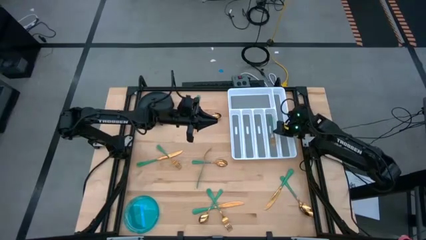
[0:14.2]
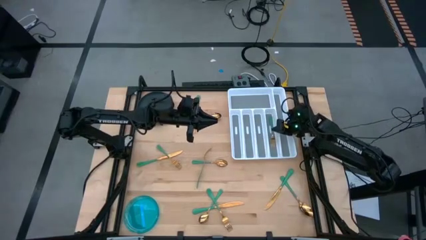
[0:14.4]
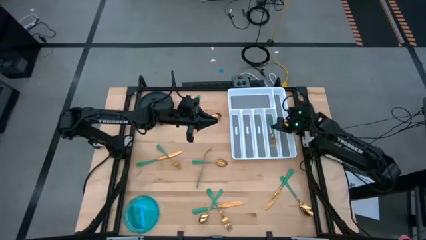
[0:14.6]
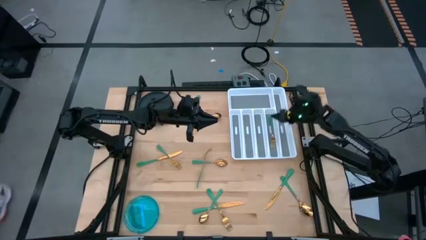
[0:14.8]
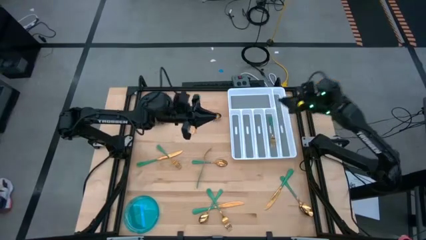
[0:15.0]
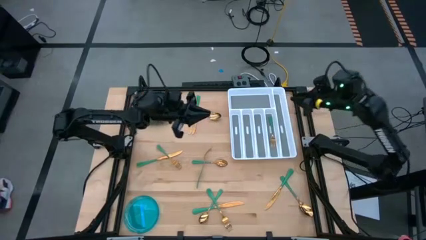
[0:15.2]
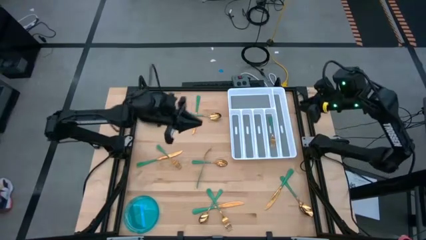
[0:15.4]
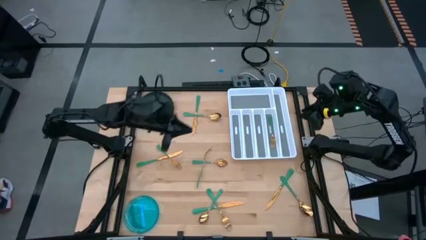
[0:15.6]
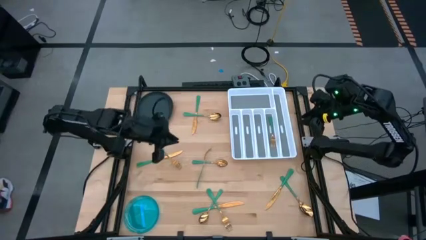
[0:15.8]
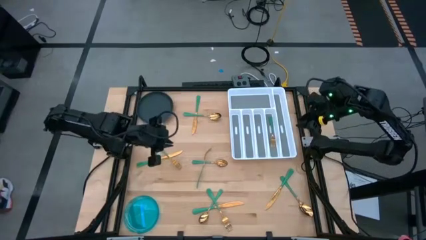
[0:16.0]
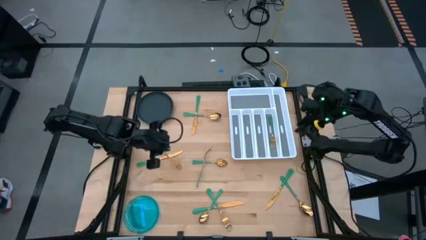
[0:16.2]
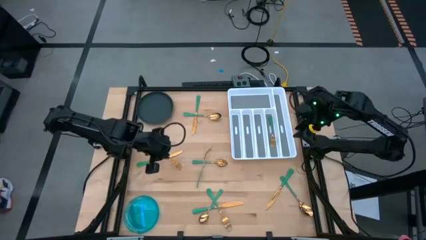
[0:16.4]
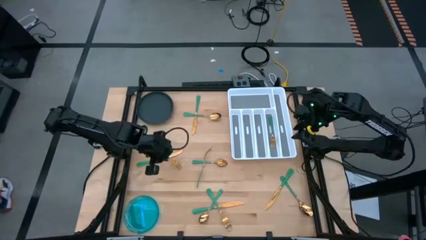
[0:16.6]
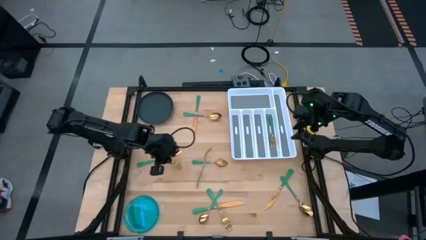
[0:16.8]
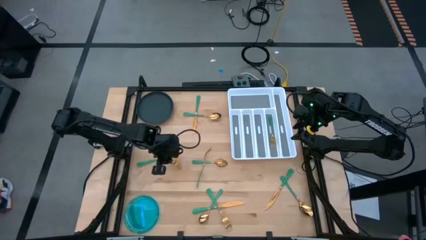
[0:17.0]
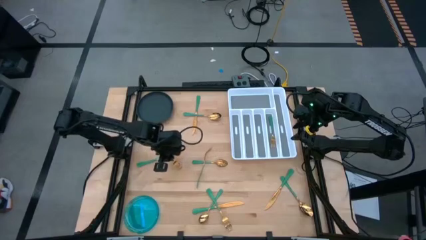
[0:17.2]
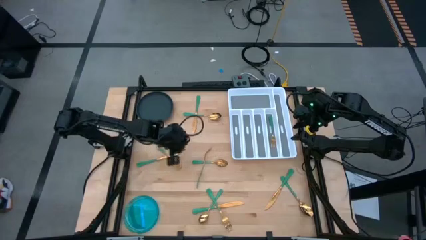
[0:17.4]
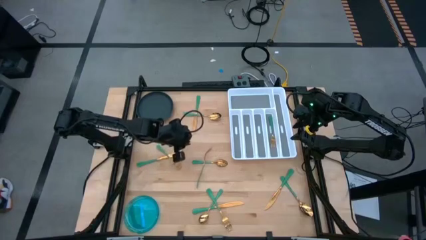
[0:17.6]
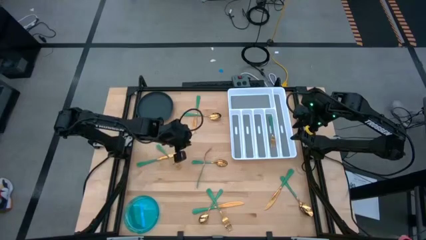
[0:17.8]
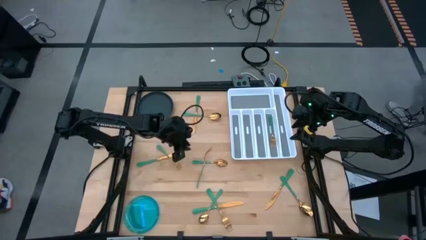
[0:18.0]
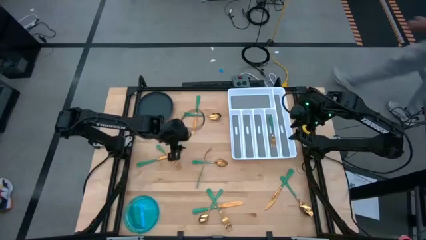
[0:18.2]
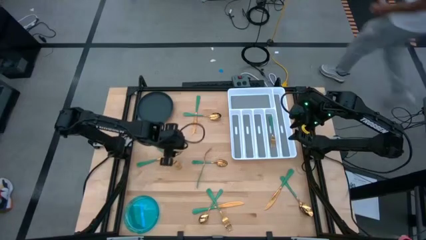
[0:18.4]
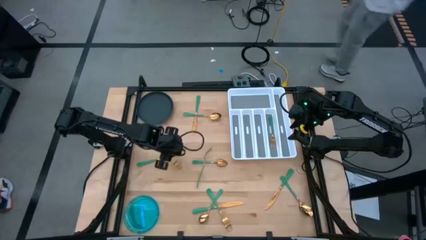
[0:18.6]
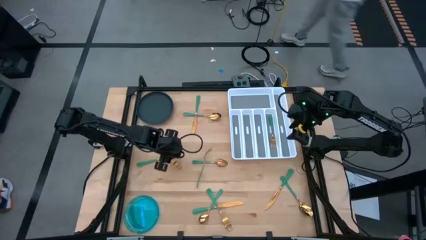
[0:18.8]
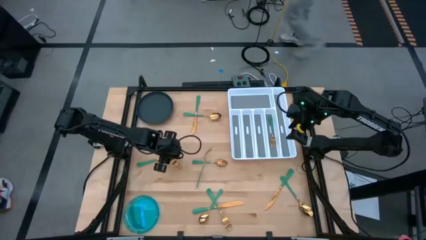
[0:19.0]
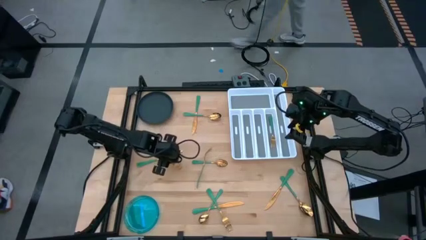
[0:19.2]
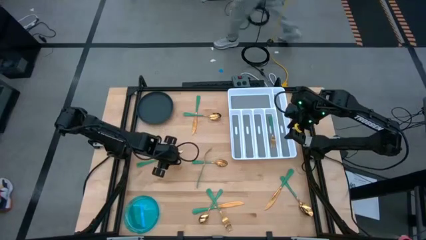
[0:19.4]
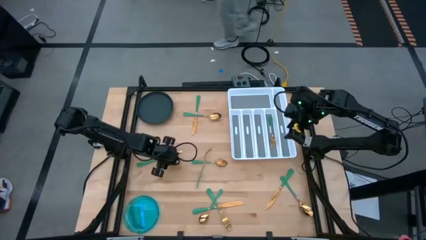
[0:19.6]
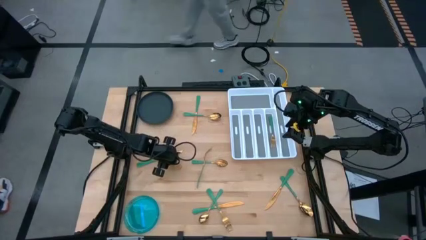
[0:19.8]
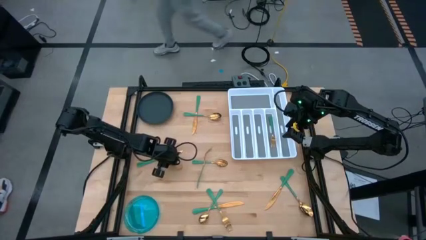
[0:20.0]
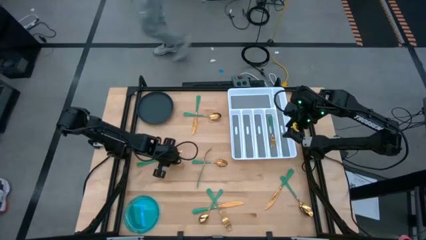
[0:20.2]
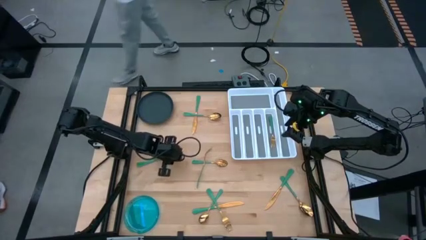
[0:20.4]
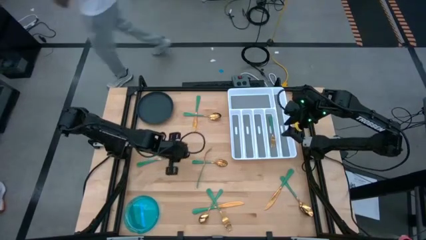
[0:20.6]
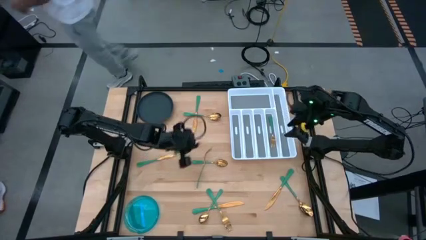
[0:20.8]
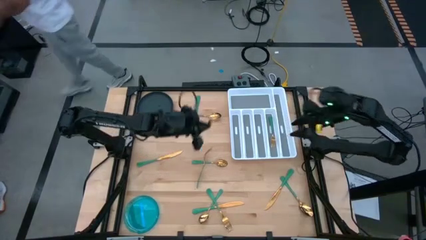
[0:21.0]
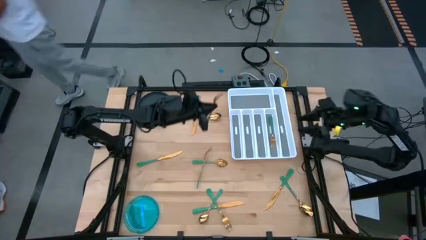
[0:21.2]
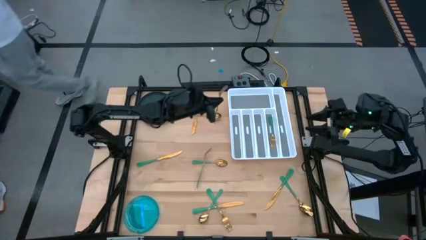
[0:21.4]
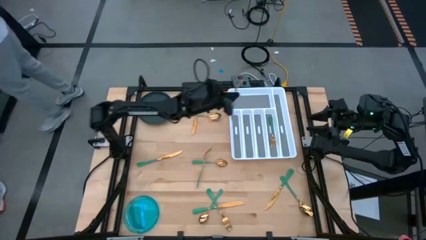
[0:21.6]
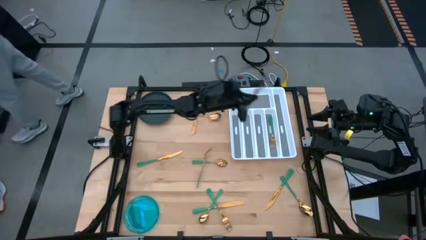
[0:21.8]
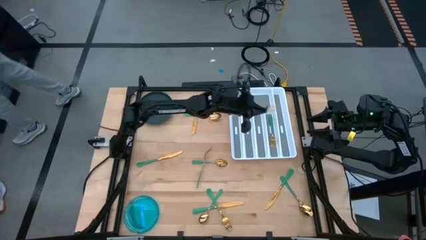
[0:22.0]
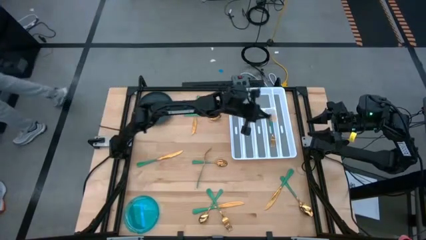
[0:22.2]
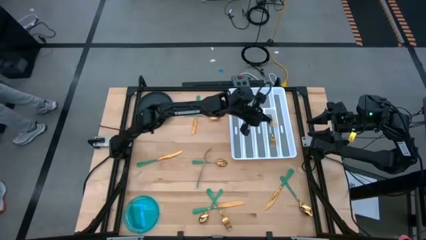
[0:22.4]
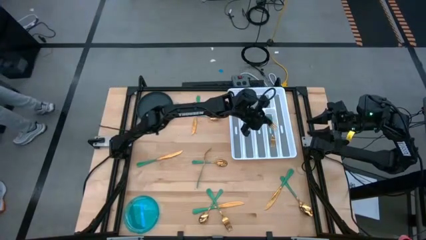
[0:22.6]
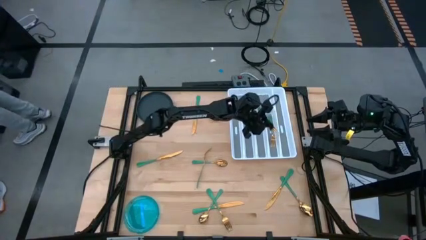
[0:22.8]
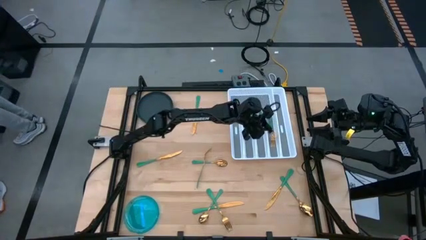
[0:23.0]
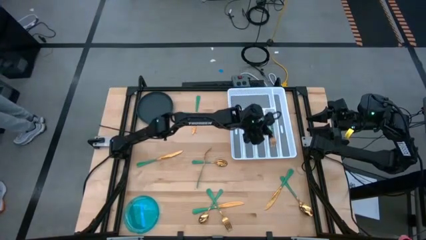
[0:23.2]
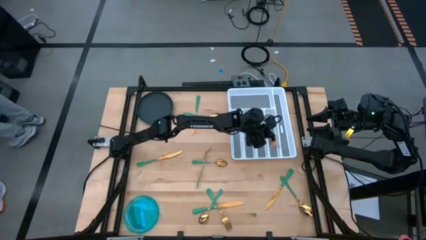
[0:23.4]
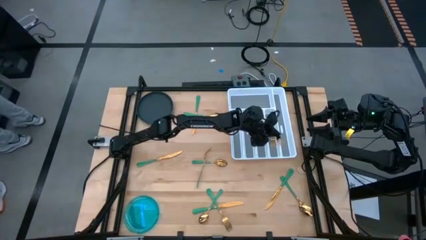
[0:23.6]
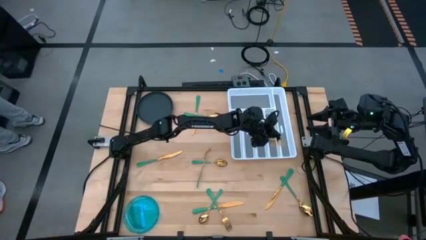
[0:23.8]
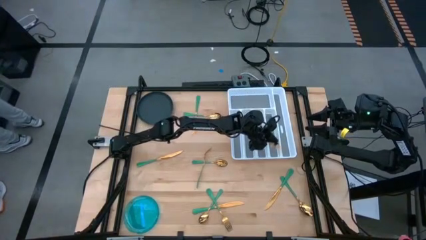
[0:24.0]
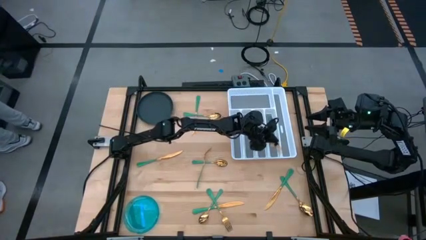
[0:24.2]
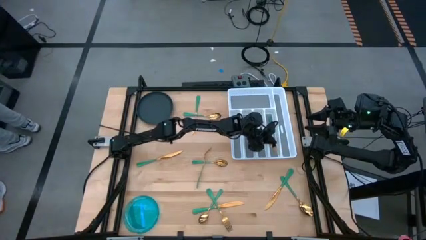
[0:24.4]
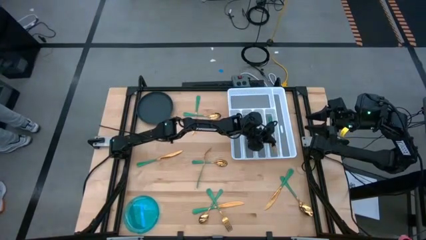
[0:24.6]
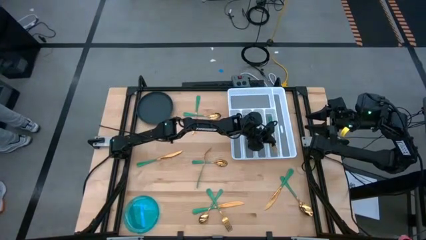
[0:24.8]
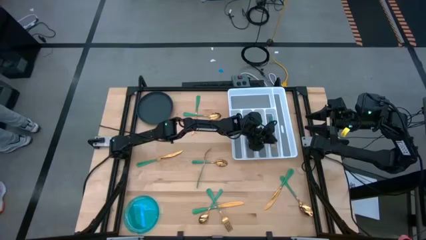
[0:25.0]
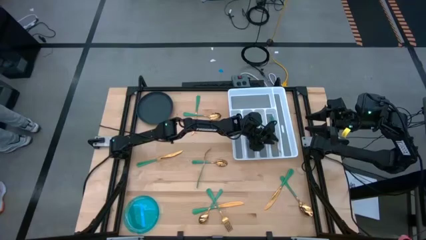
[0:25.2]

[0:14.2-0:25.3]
Task: Sort silverware
Put the top left green fork on the silverware tray with the other green fork
